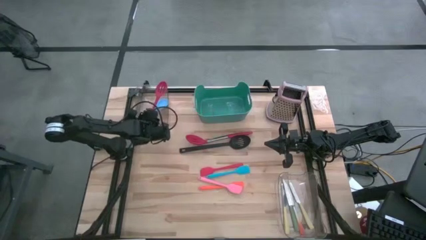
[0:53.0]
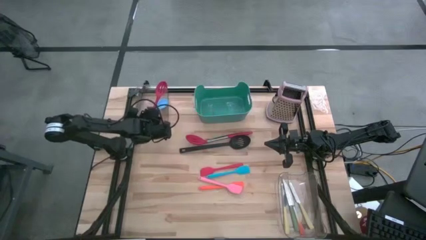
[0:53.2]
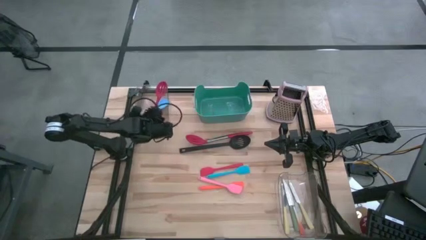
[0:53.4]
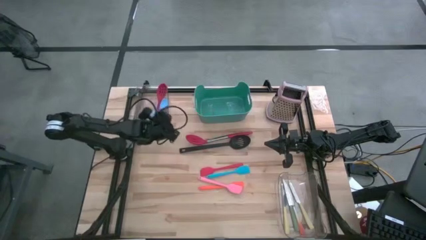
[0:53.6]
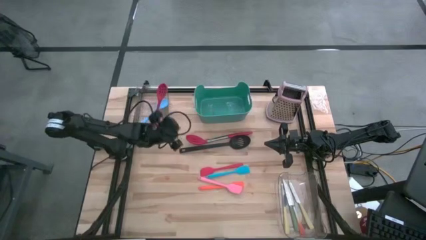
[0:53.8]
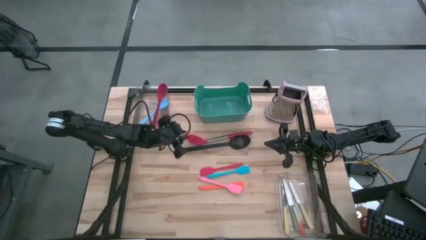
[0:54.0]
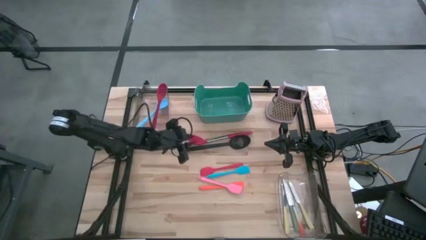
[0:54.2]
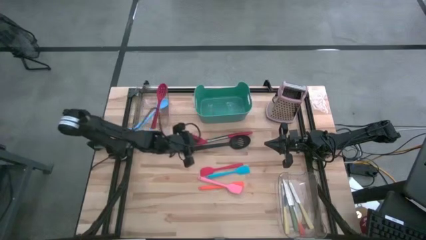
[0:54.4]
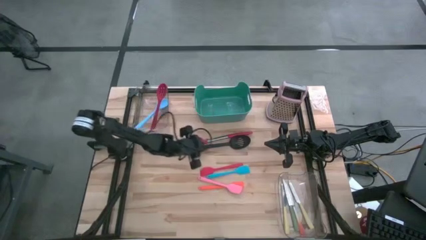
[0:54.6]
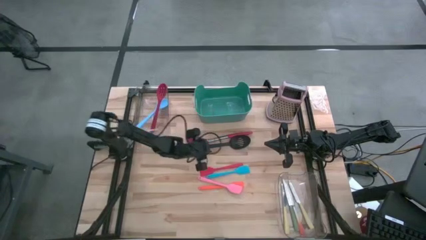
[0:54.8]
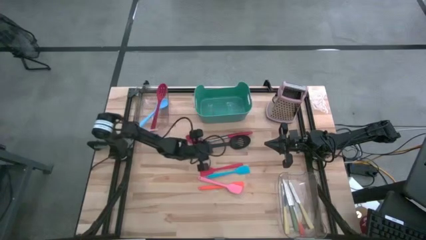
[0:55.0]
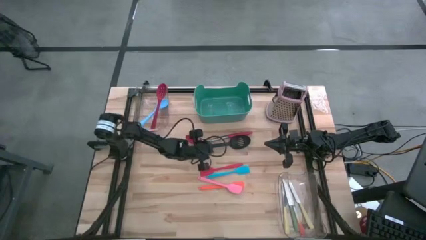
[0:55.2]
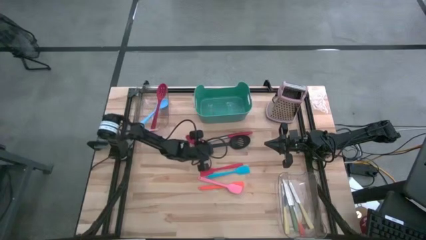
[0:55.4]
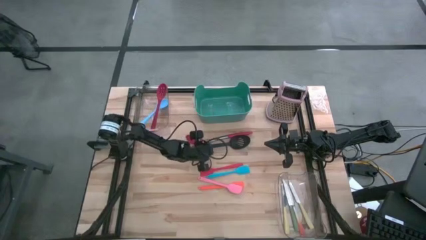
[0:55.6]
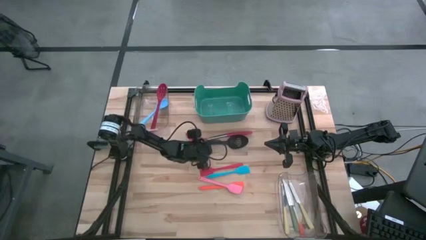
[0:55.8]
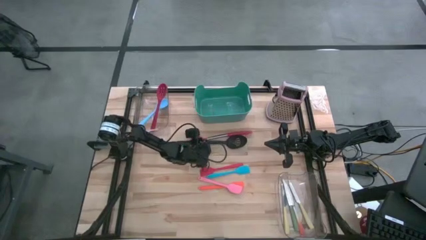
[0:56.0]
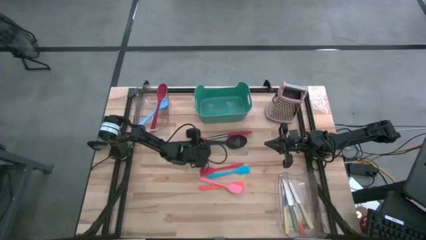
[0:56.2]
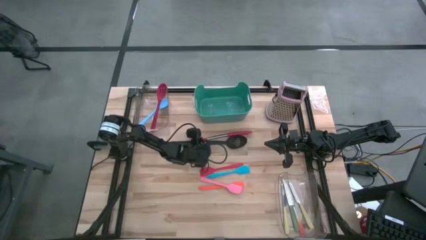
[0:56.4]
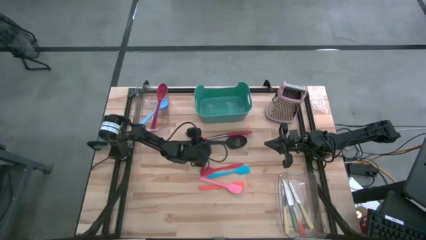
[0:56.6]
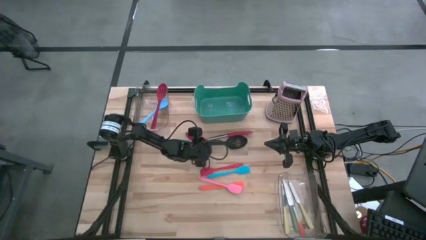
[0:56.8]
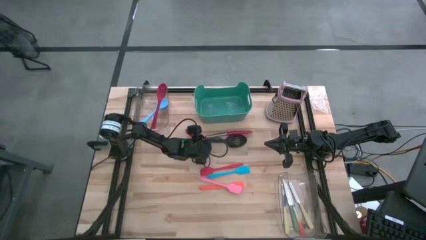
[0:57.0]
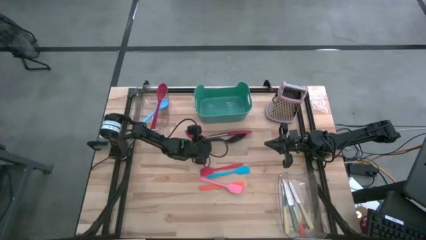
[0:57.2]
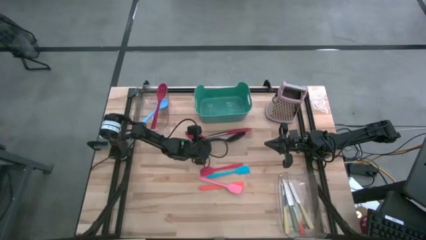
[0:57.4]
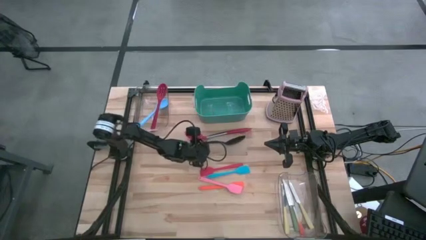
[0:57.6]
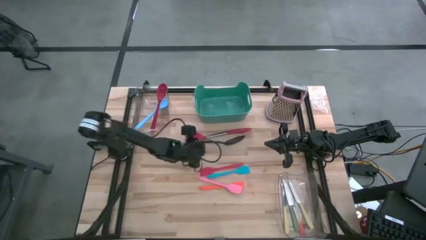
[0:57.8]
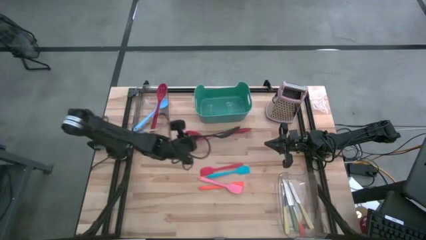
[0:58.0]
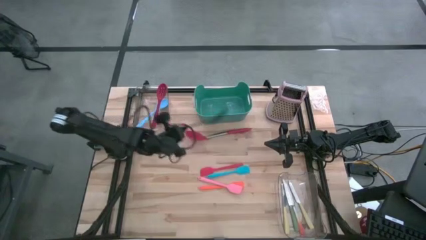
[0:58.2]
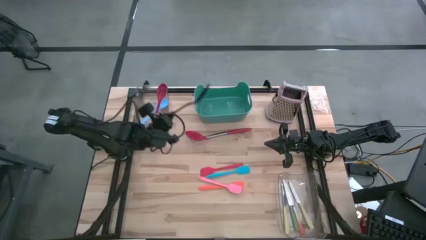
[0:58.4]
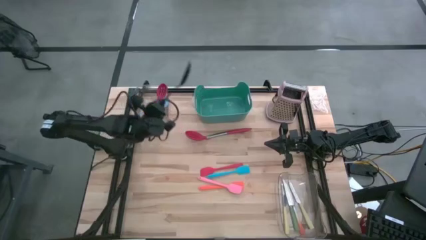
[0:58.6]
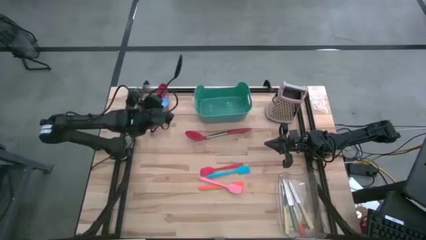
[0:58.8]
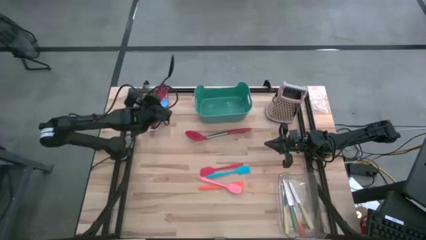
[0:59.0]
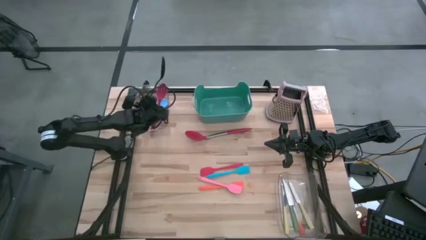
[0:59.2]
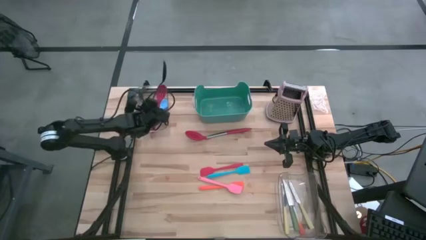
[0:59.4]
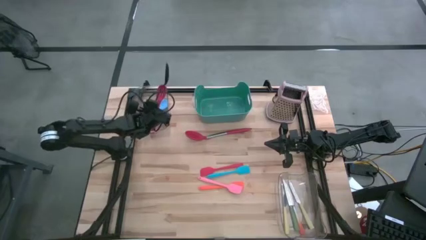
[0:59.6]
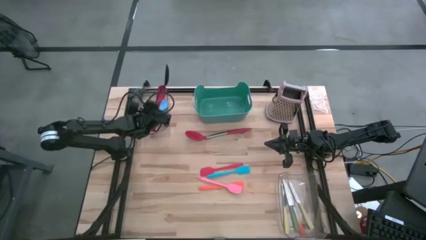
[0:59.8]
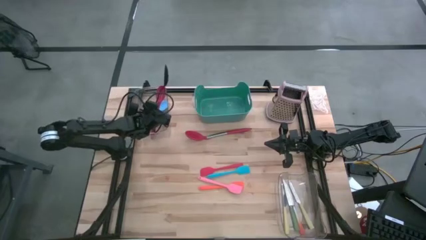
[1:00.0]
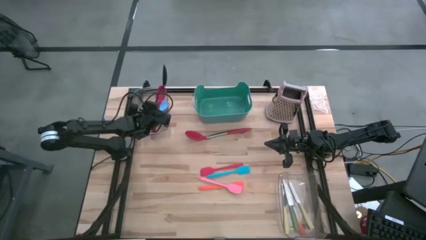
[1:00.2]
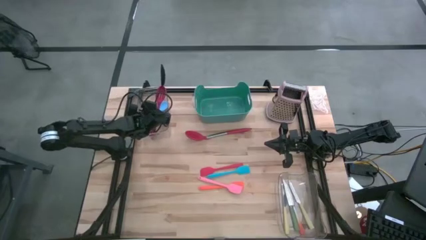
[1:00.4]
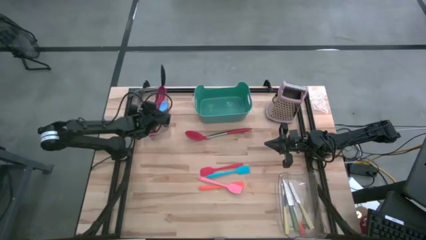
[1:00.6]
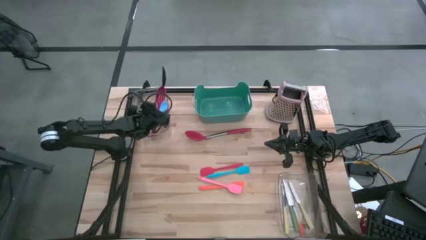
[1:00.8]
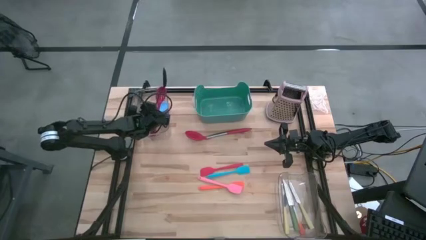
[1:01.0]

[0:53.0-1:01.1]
Task: Pick & Place Kitchen Items
Put the black slotted spoon into the top transparent bin

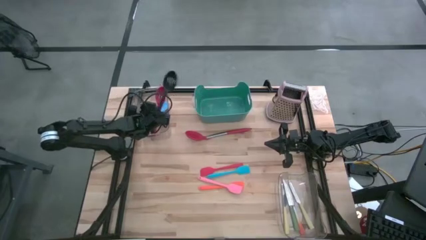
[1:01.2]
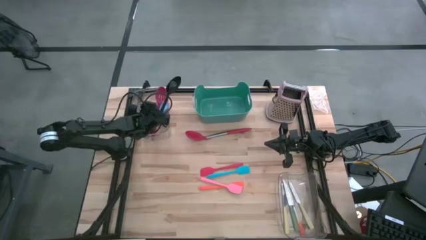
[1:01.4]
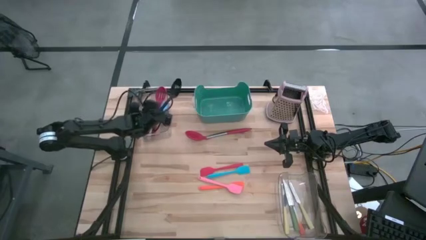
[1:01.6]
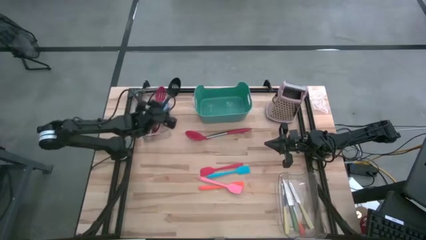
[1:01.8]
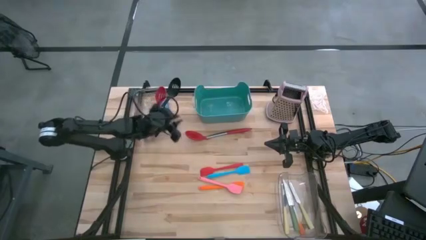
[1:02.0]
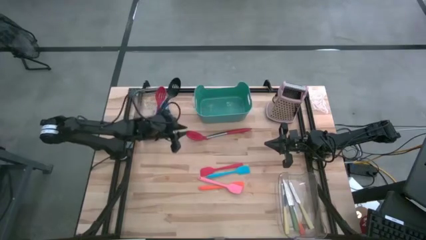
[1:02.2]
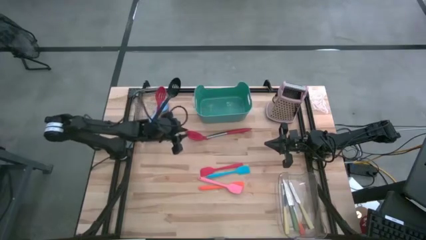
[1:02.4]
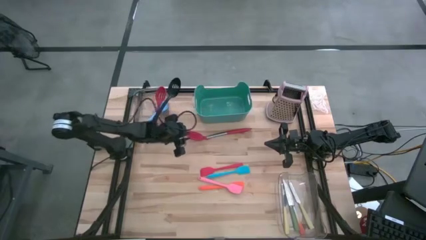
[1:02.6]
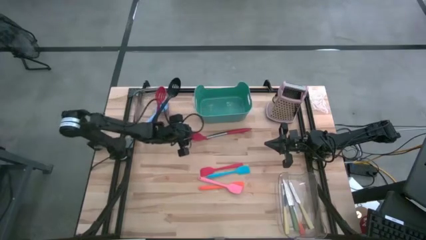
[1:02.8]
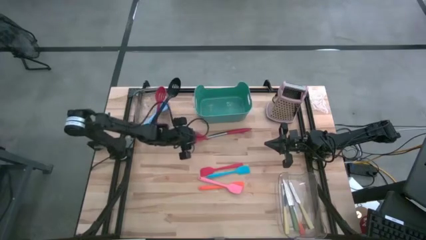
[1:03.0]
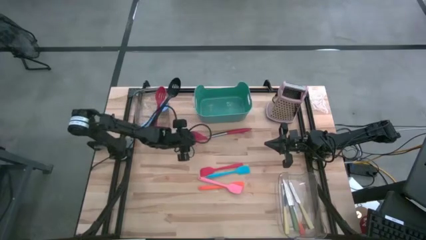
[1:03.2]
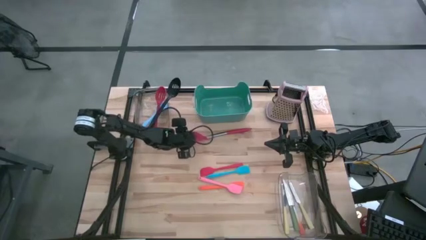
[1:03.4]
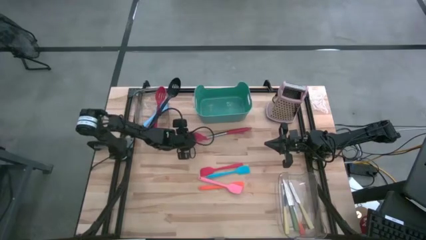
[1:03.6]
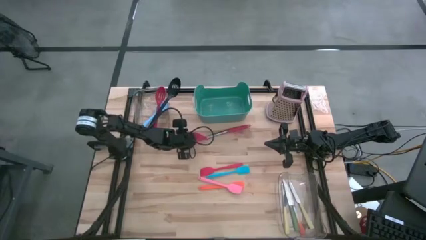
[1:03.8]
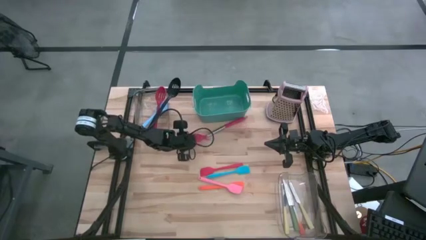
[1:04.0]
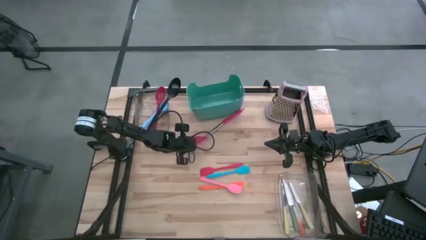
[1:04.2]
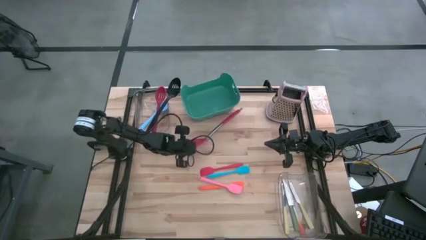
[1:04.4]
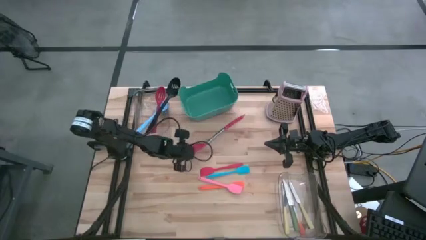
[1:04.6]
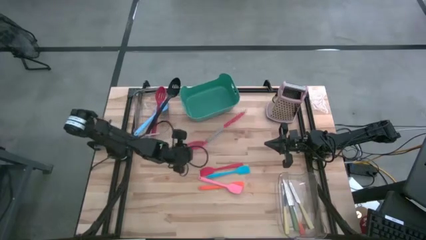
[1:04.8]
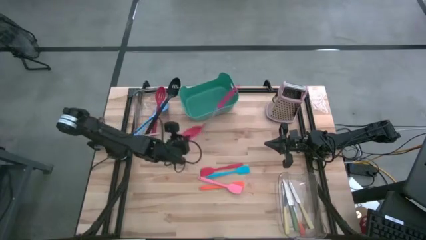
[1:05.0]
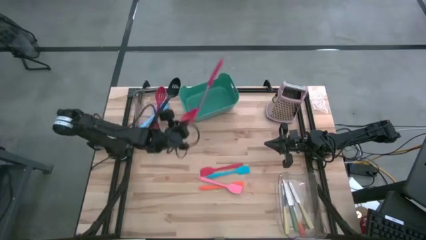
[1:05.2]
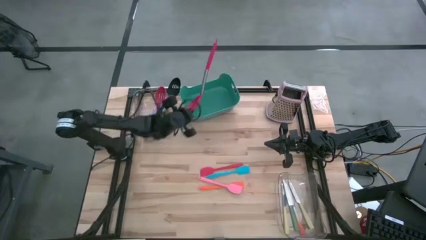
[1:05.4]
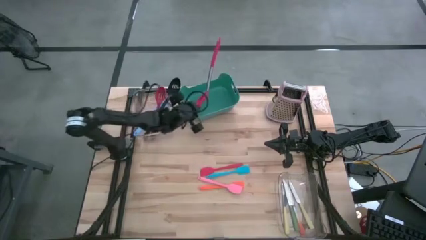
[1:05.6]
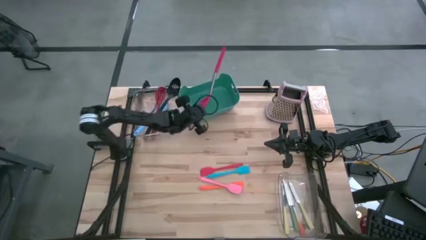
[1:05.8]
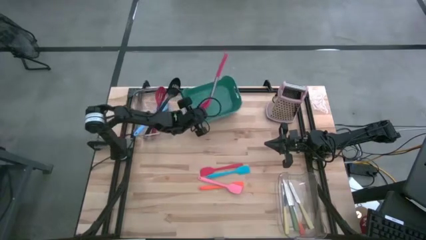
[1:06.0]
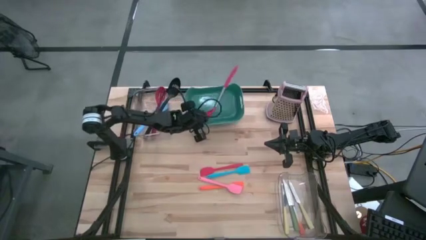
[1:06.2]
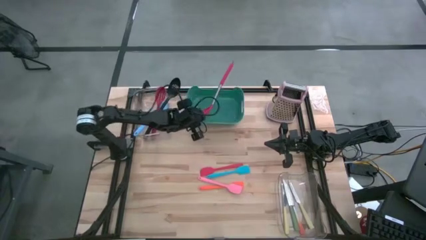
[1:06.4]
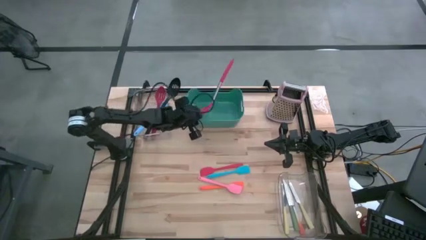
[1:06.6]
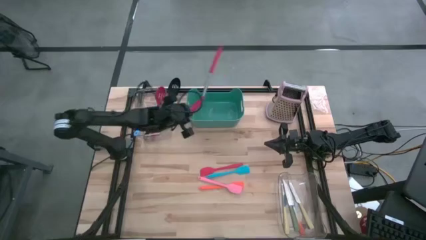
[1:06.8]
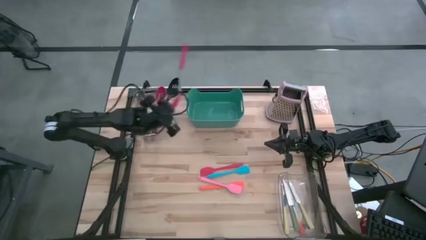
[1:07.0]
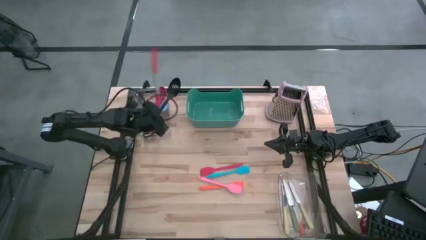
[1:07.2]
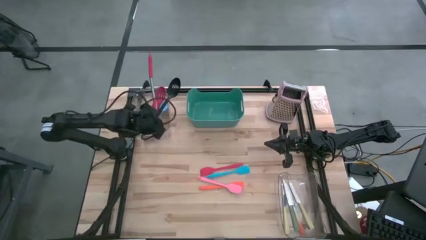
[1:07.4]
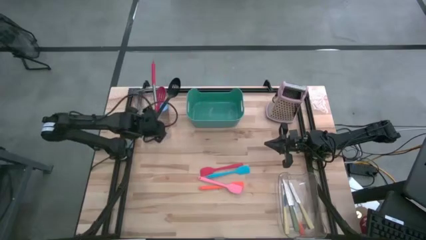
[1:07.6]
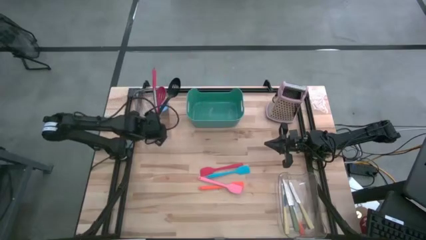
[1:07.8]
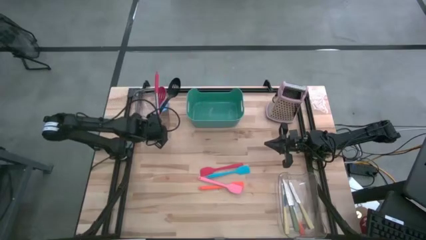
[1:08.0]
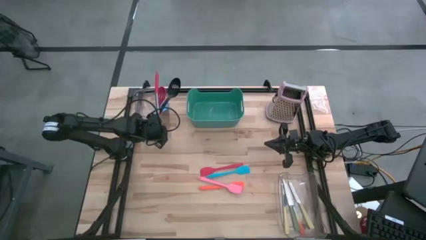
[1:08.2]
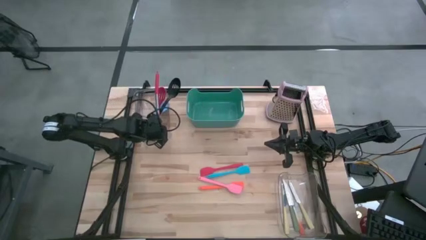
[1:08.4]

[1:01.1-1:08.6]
Put the light red slotted spoon into the top transparent bin
